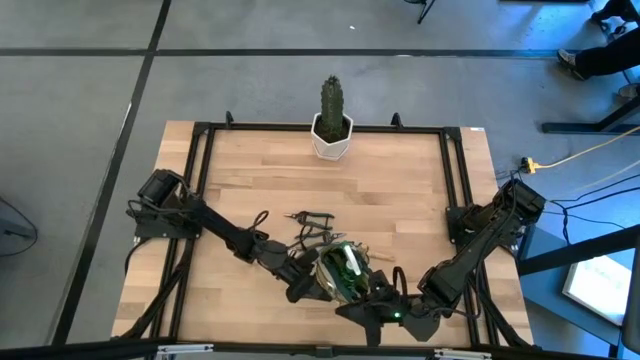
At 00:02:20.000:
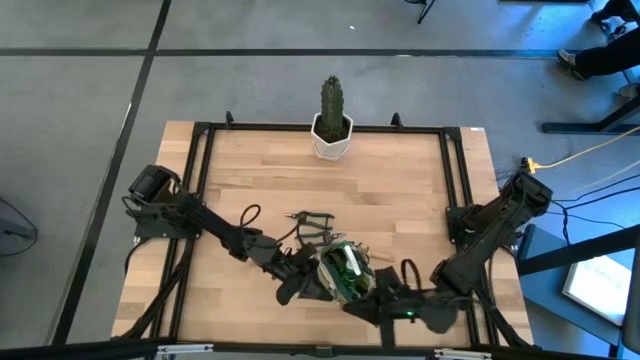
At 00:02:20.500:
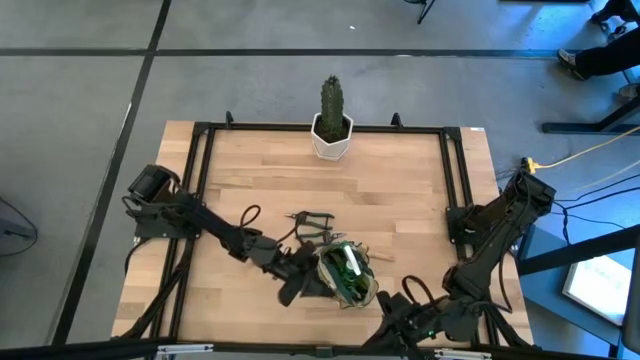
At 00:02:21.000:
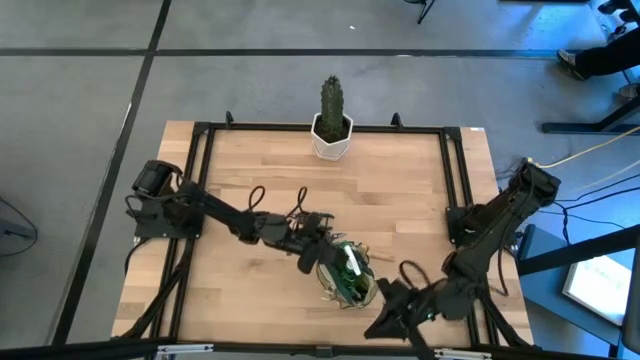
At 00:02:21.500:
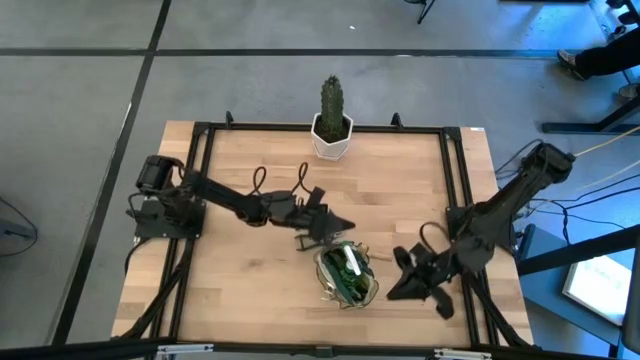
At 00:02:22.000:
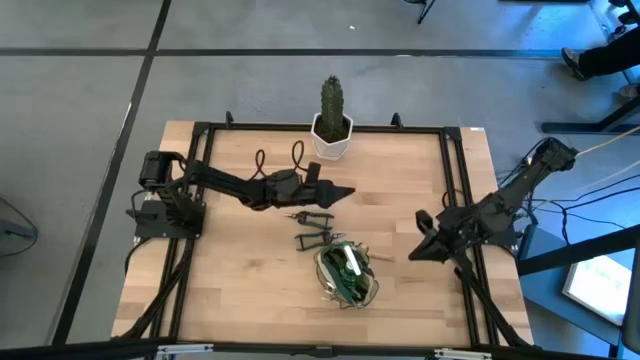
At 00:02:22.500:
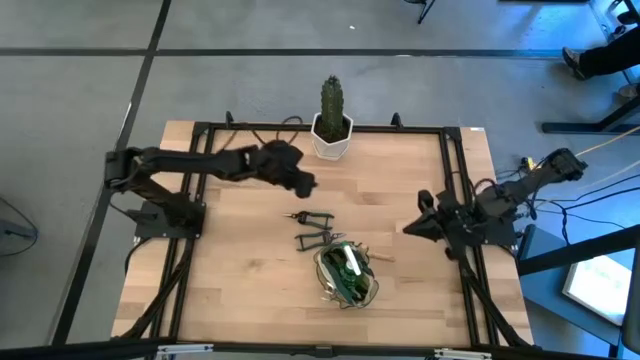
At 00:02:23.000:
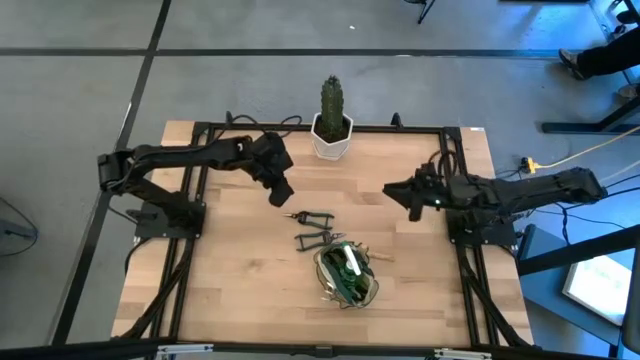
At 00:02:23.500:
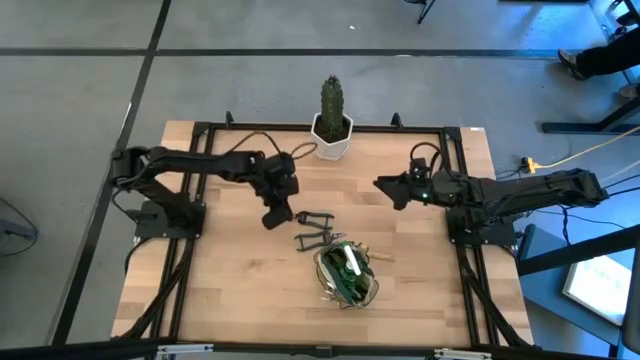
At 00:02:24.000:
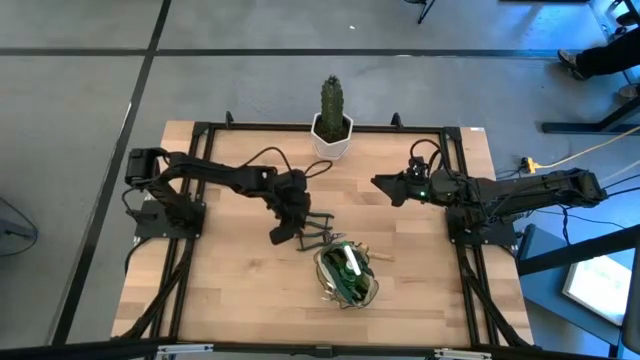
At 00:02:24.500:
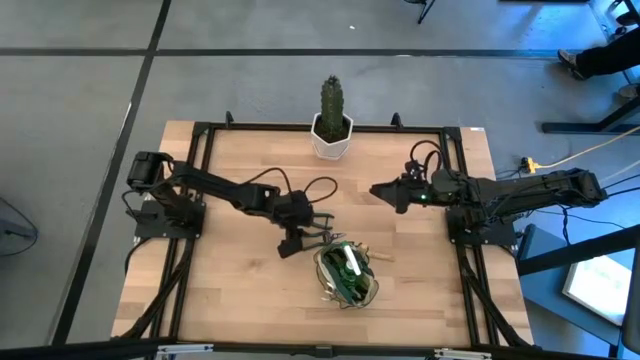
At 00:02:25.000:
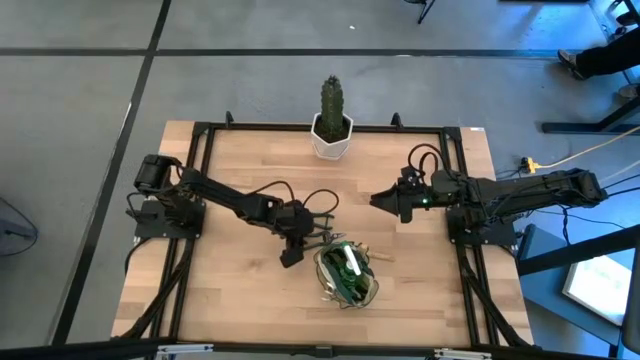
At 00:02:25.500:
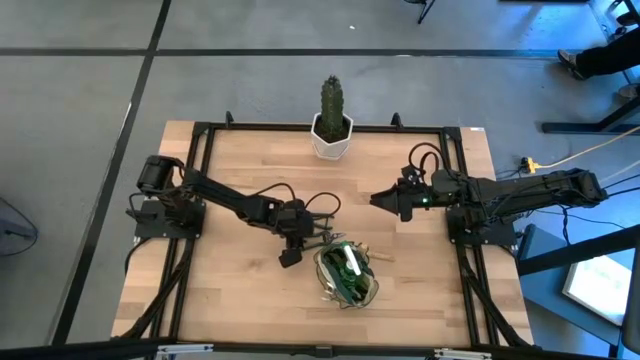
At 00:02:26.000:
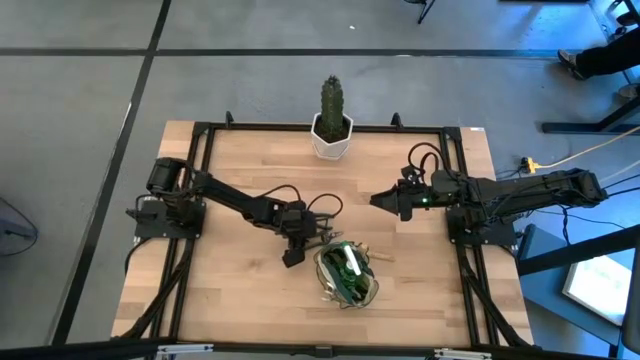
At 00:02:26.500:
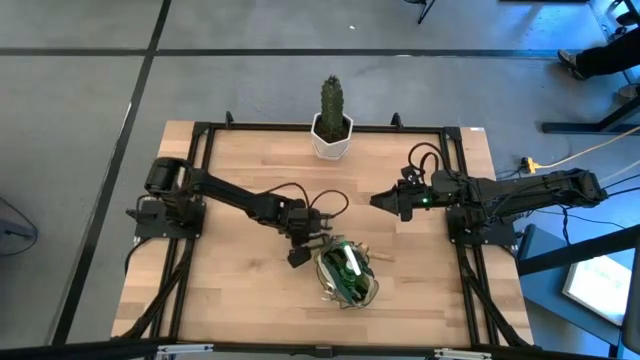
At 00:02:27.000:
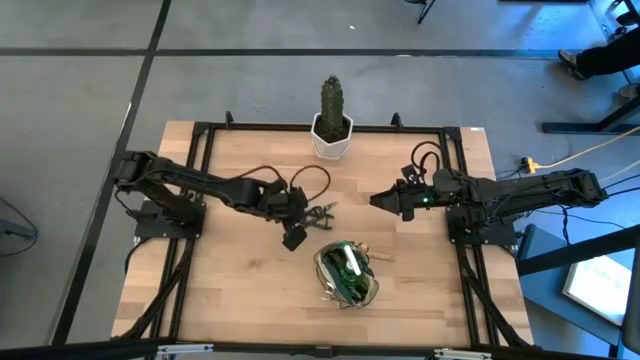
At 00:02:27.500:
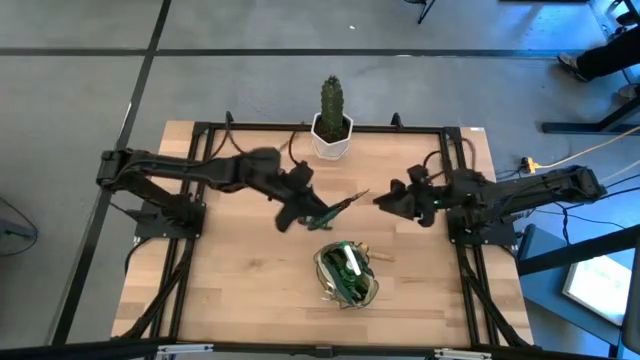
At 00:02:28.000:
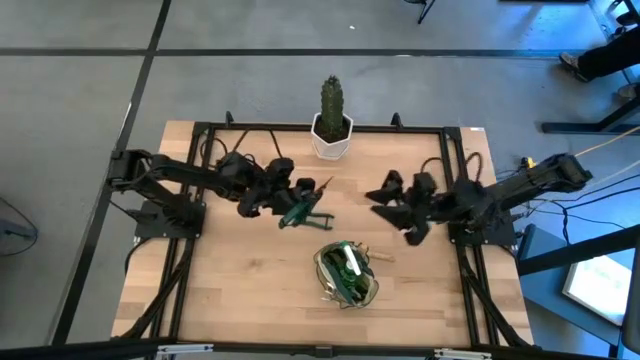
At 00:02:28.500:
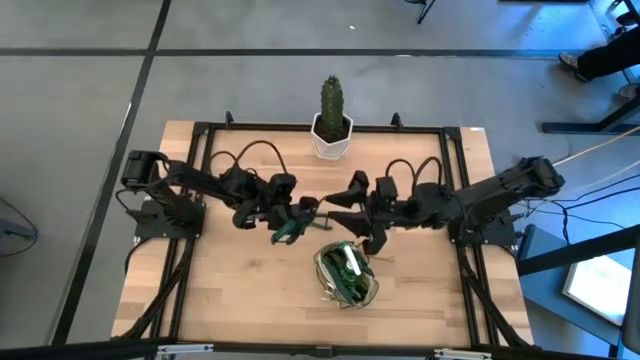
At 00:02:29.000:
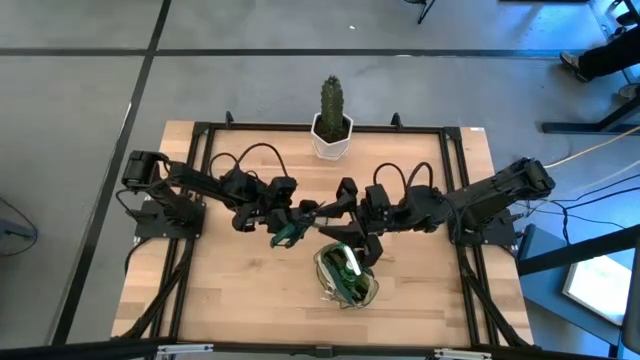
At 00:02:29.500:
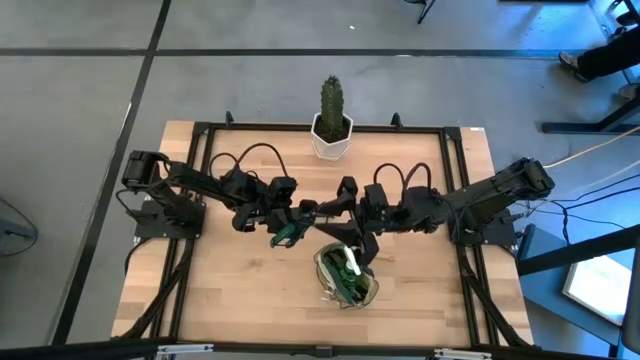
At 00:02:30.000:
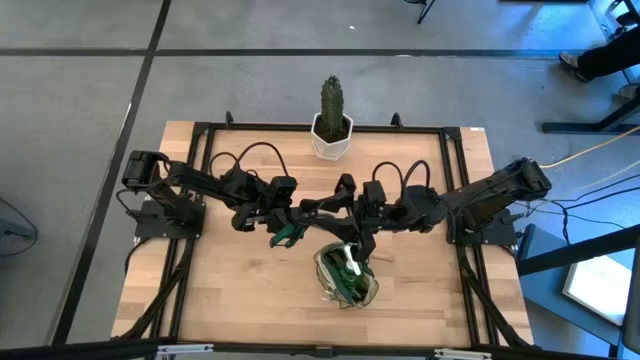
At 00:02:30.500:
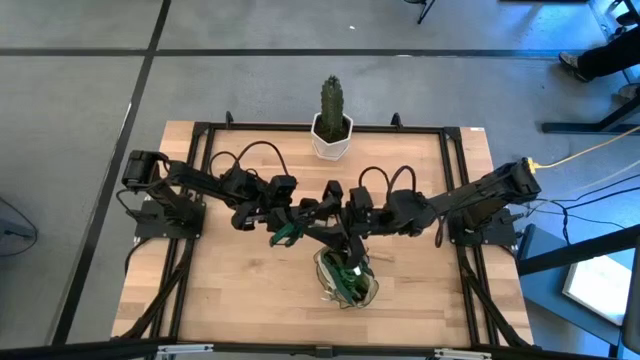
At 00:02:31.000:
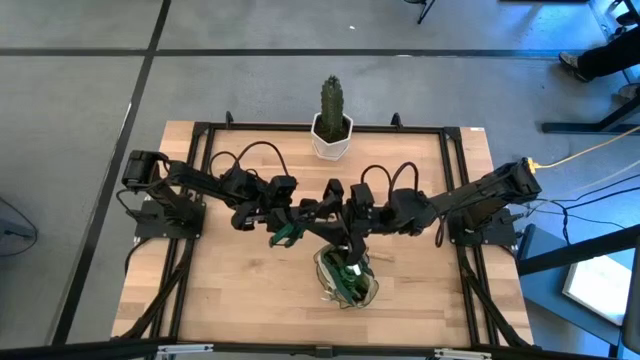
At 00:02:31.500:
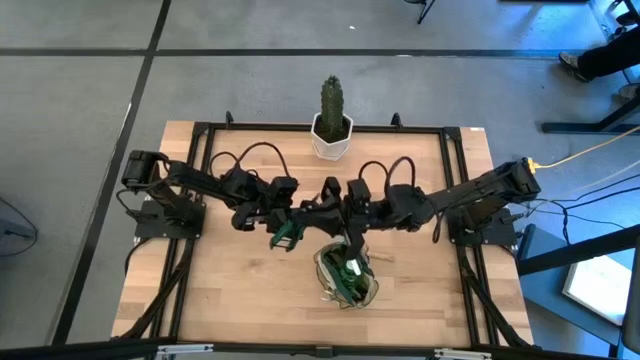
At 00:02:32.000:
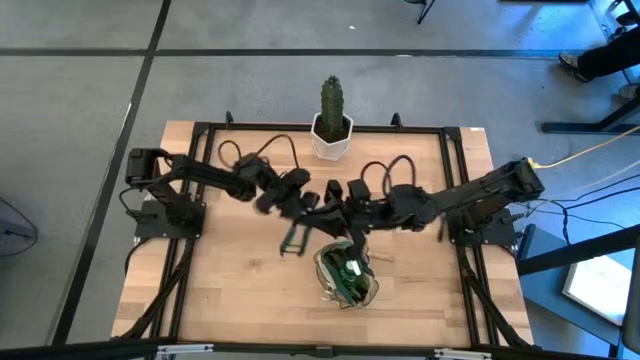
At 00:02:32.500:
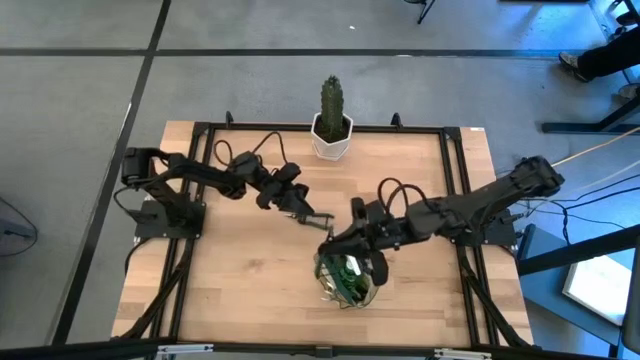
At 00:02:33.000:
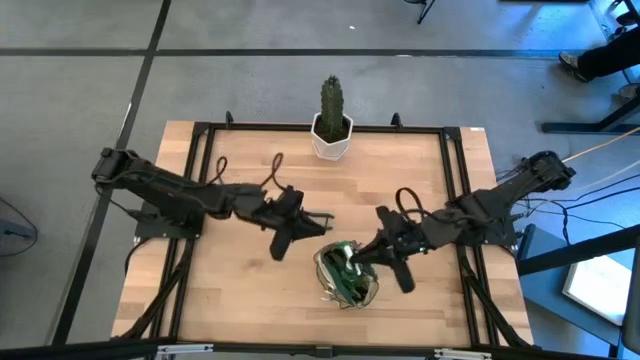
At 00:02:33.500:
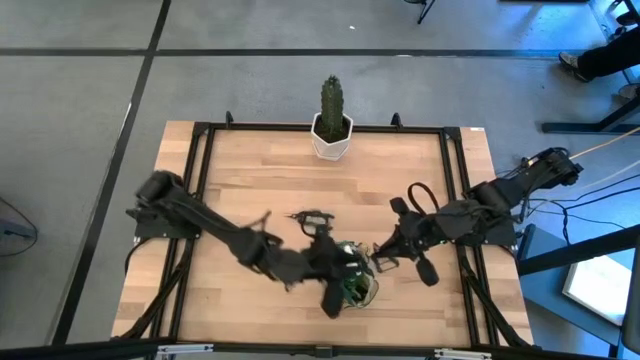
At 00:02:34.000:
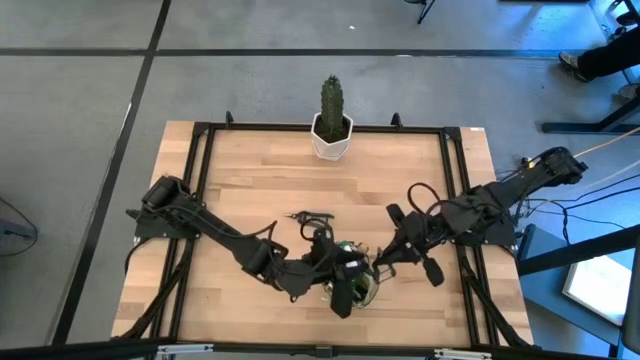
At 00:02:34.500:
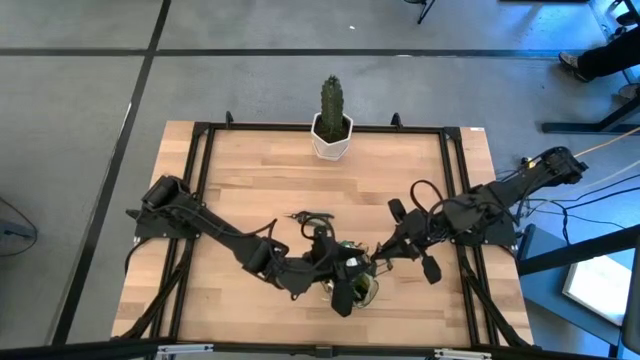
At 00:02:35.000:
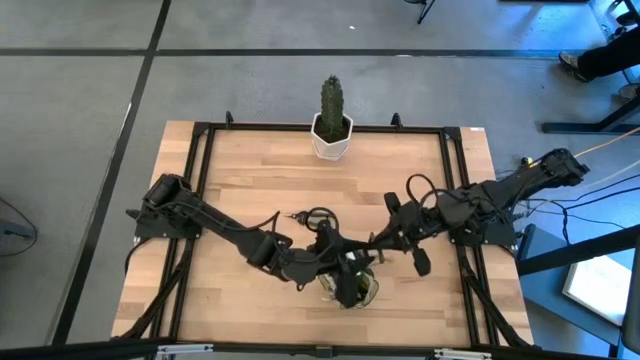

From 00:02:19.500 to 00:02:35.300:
Task: Pick & Place Garden tools in Gardening bag
Put the shear scissors into the gardening bag

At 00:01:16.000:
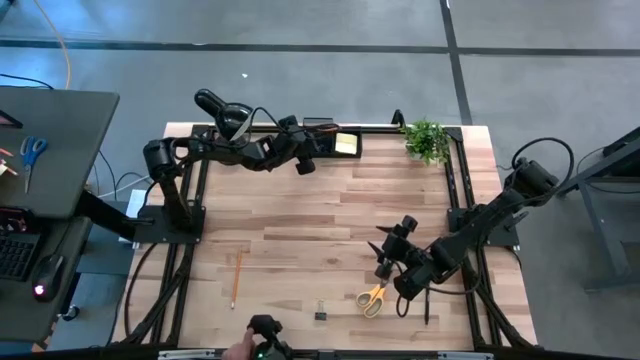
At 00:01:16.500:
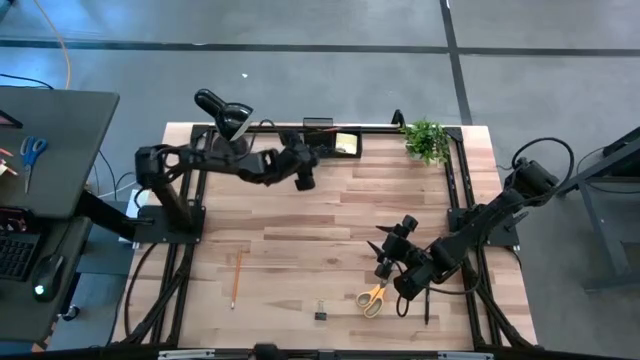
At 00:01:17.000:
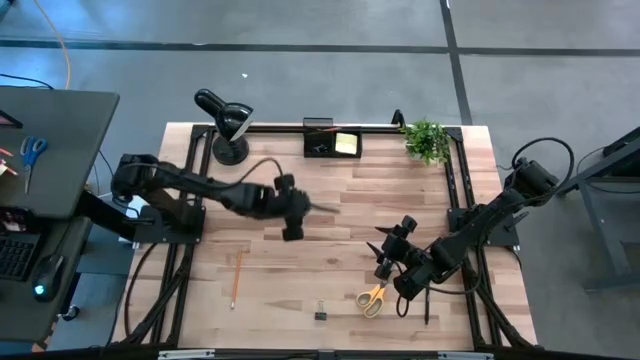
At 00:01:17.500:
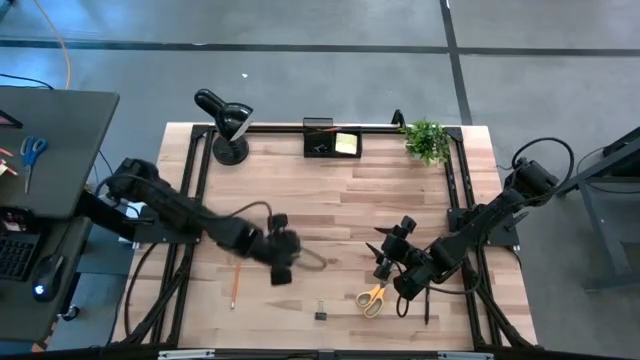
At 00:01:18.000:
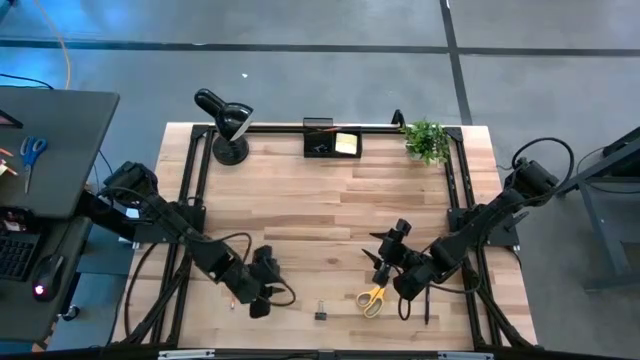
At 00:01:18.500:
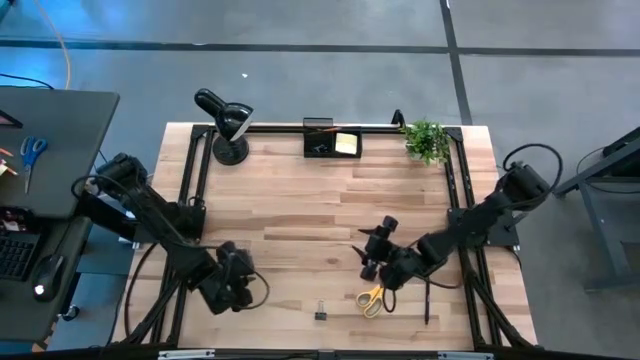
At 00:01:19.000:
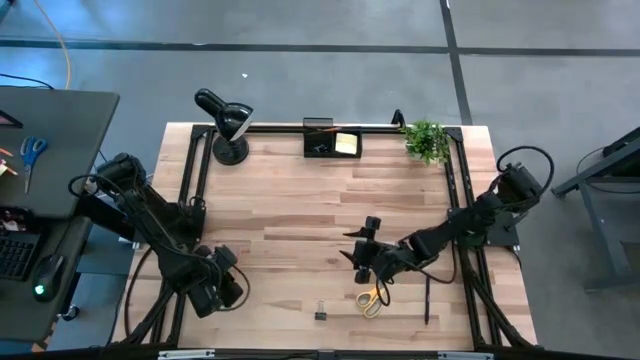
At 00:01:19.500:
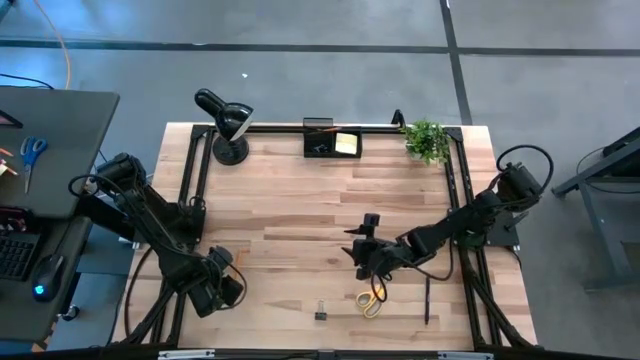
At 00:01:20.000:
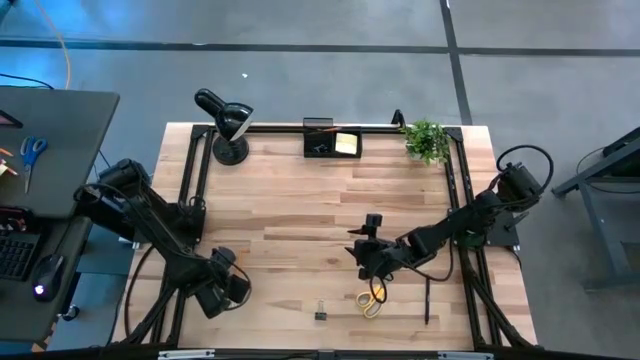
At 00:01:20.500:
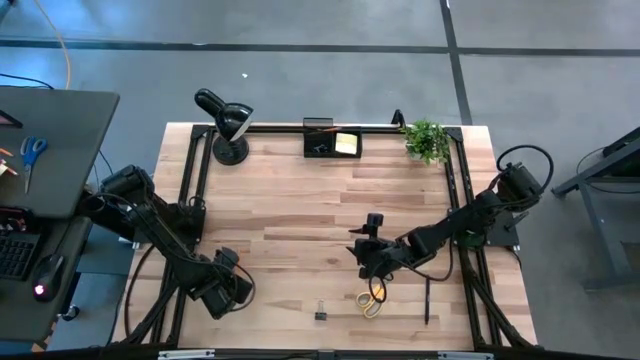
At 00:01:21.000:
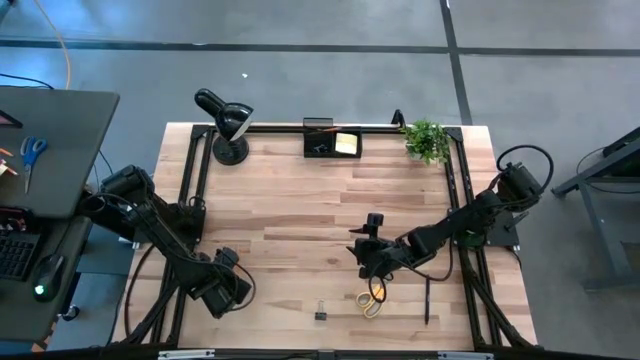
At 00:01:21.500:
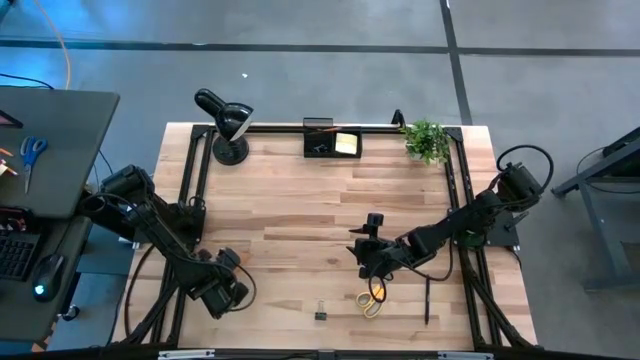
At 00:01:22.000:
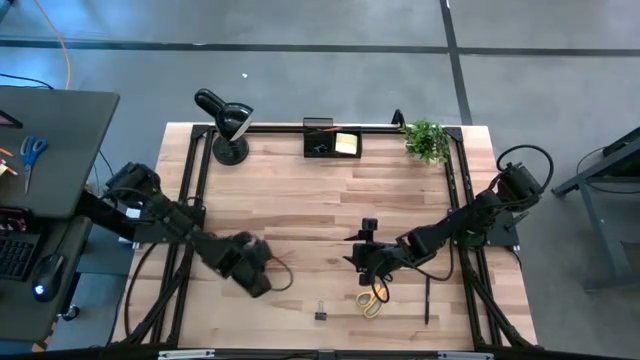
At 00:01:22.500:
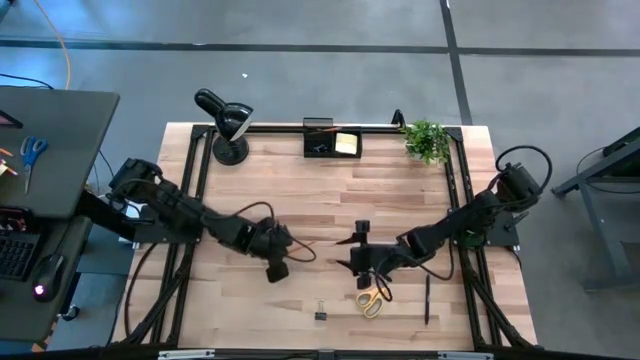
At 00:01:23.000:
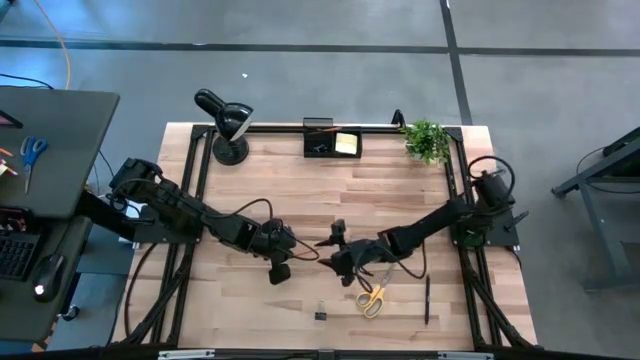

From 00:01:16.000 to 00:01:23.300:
Task: Pick and place office supplies into organizer
Put the orange pencil into the black desk organizer
